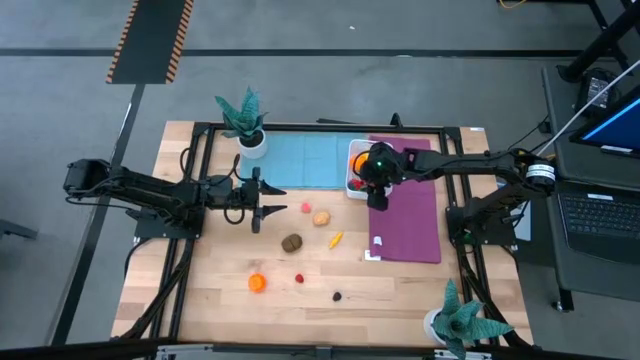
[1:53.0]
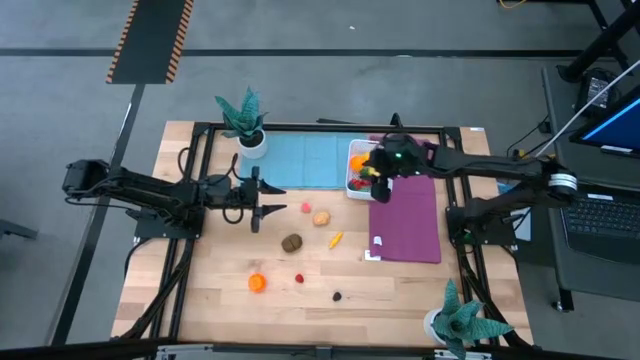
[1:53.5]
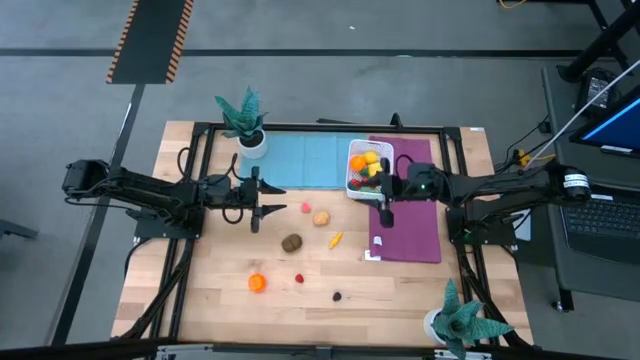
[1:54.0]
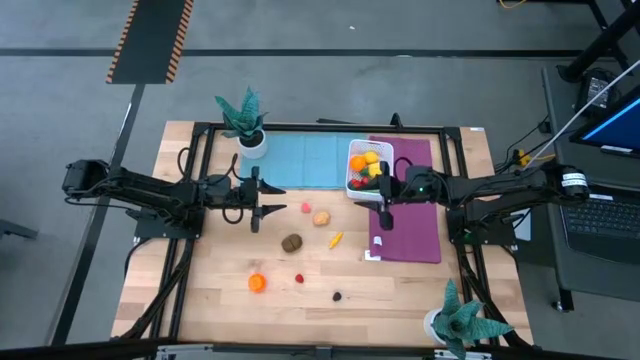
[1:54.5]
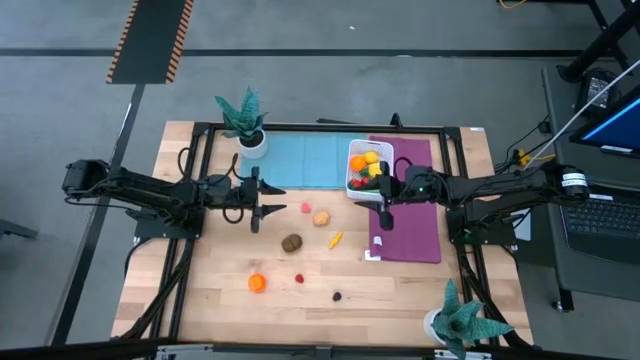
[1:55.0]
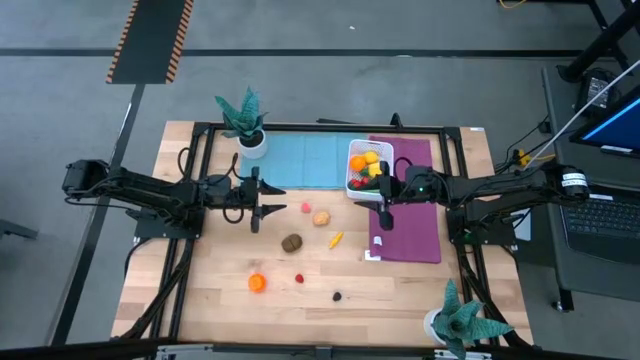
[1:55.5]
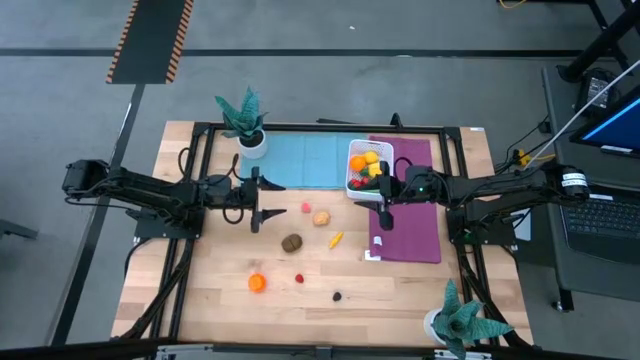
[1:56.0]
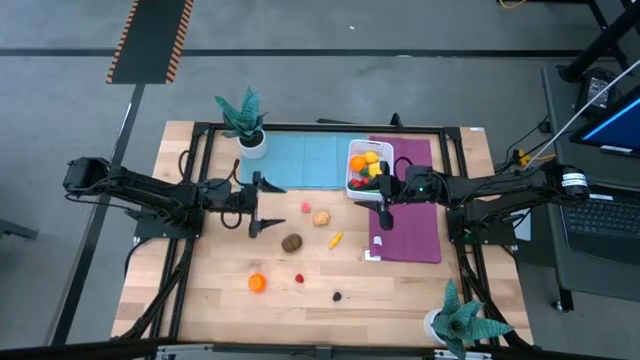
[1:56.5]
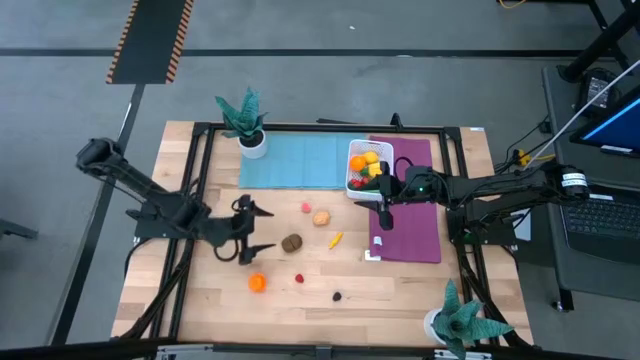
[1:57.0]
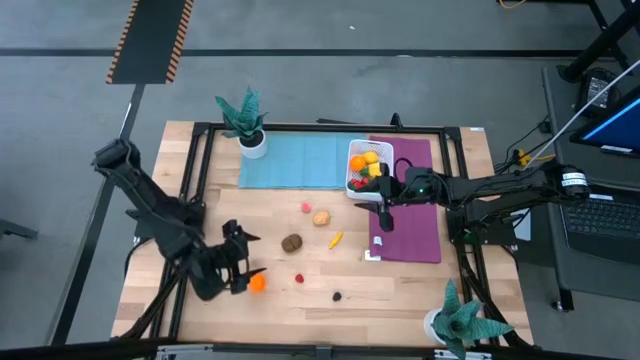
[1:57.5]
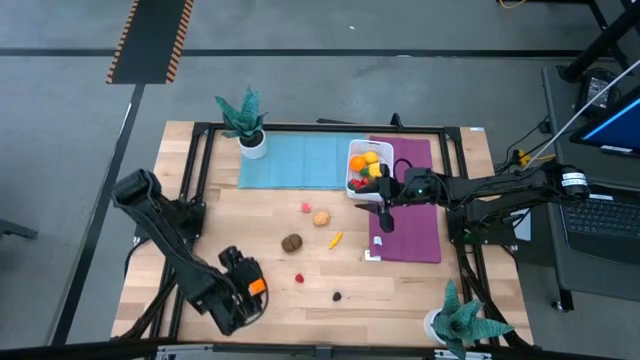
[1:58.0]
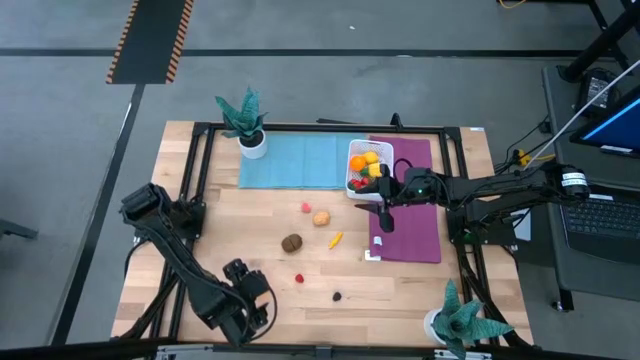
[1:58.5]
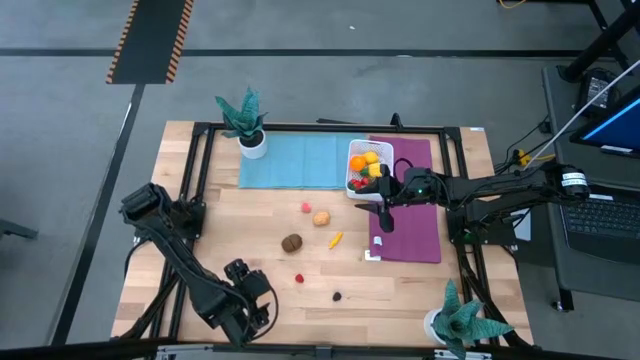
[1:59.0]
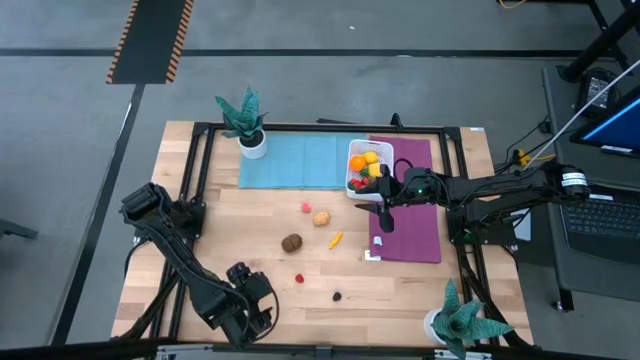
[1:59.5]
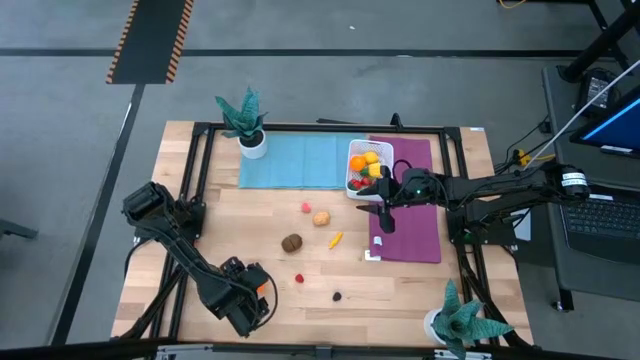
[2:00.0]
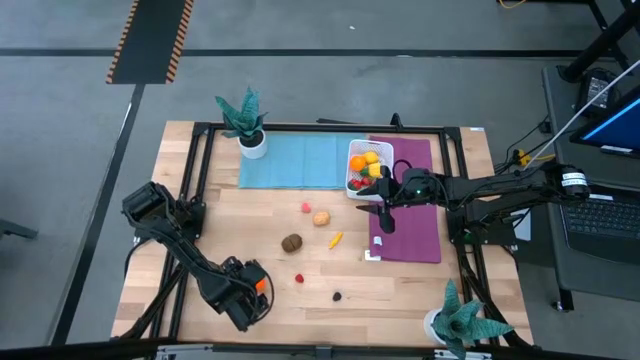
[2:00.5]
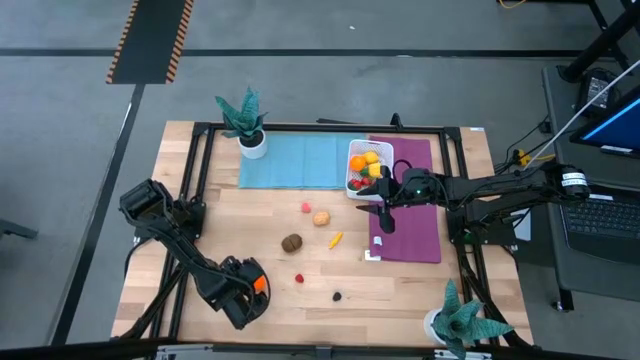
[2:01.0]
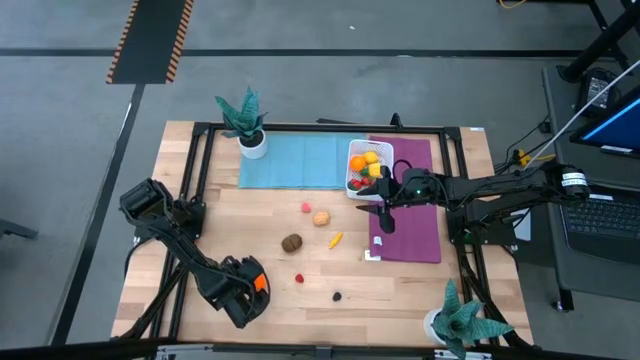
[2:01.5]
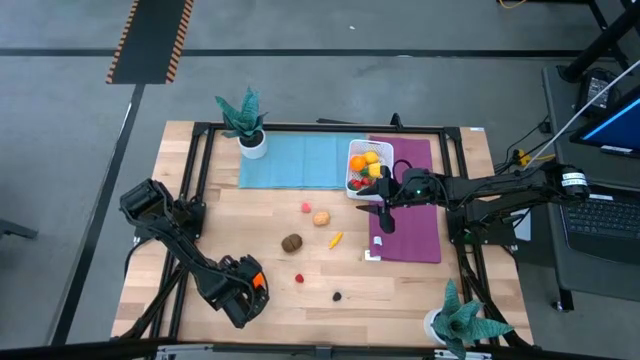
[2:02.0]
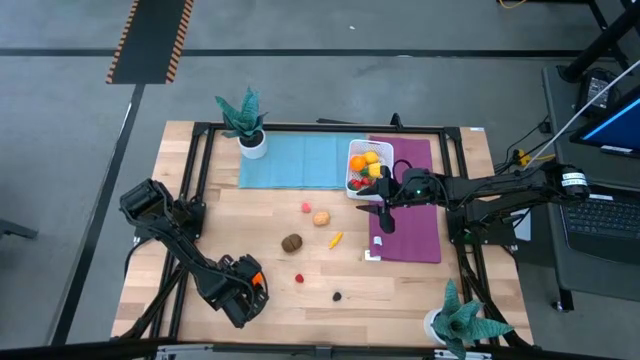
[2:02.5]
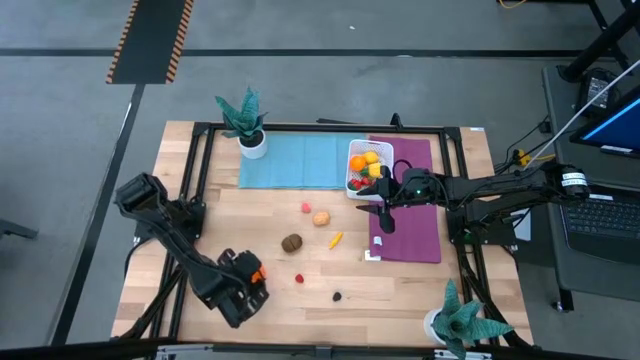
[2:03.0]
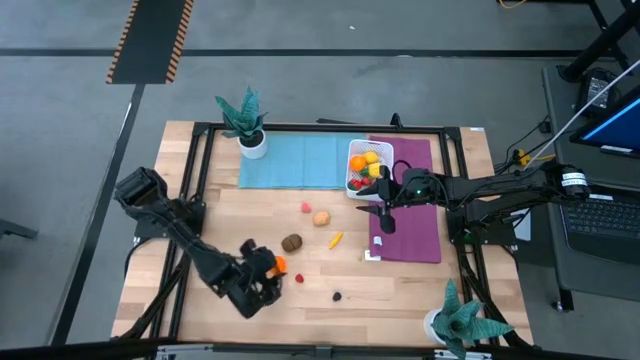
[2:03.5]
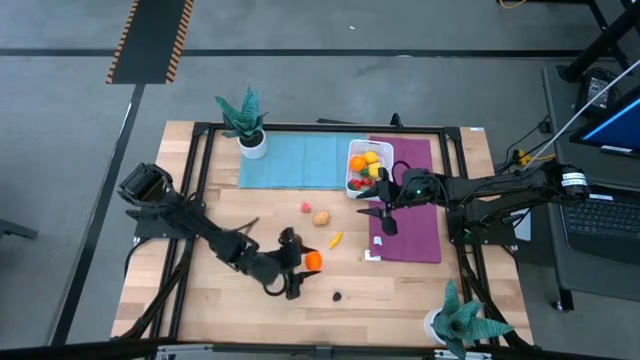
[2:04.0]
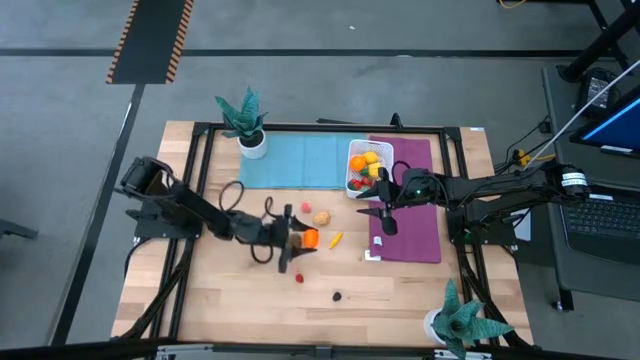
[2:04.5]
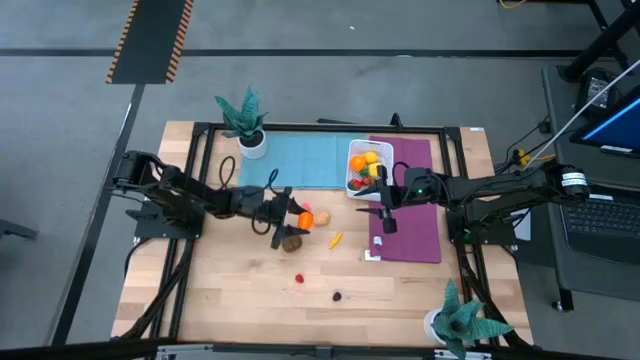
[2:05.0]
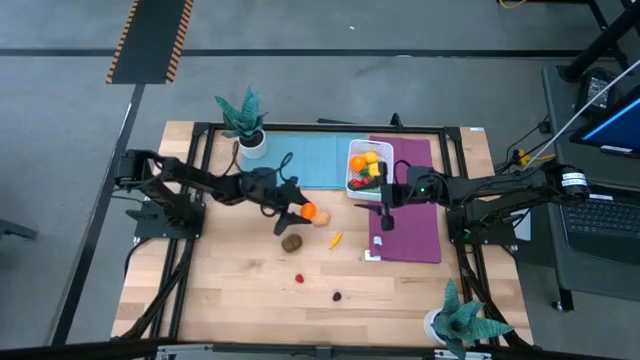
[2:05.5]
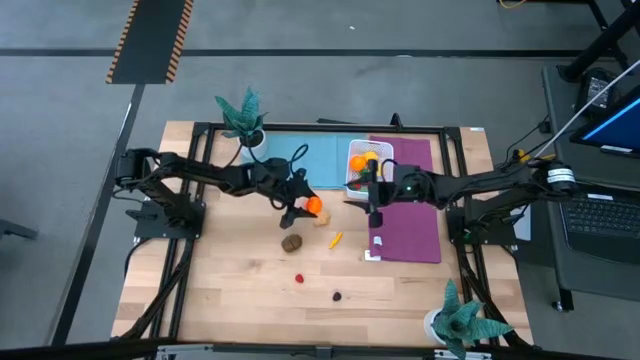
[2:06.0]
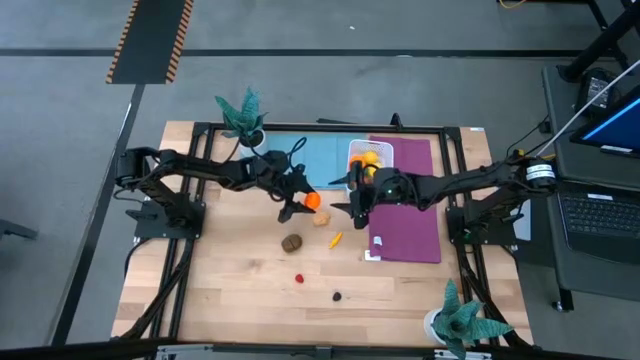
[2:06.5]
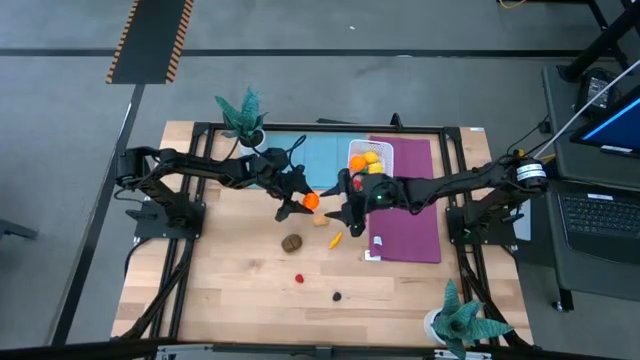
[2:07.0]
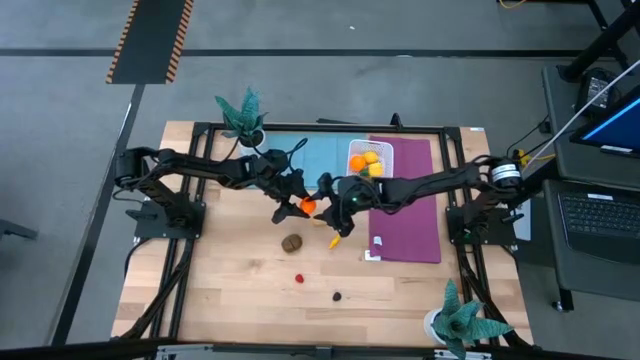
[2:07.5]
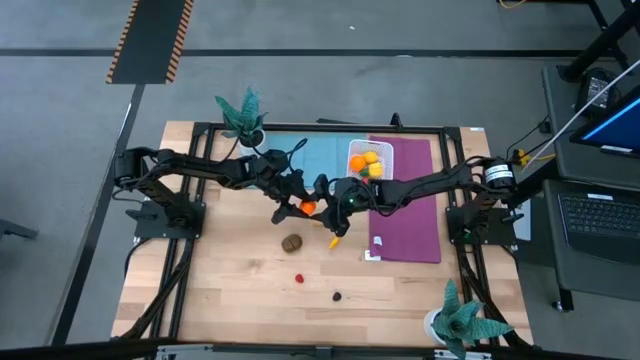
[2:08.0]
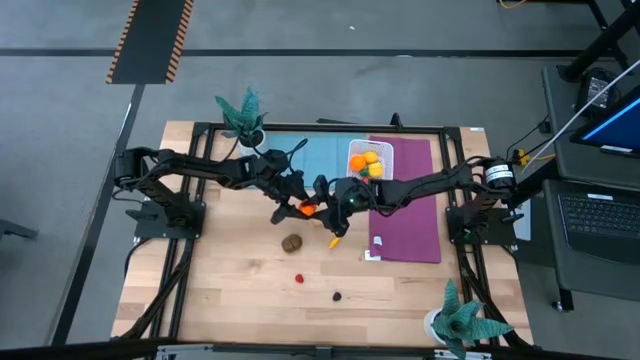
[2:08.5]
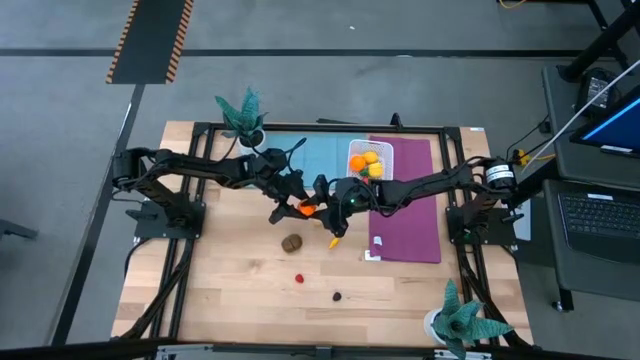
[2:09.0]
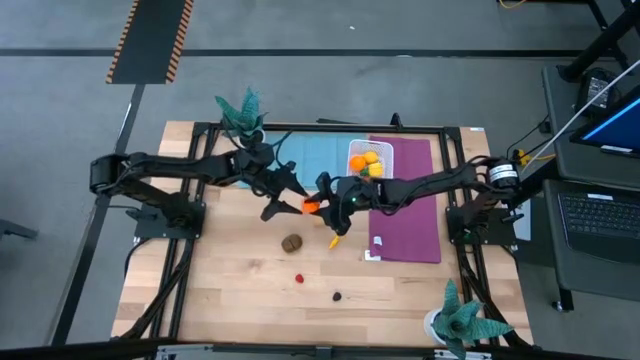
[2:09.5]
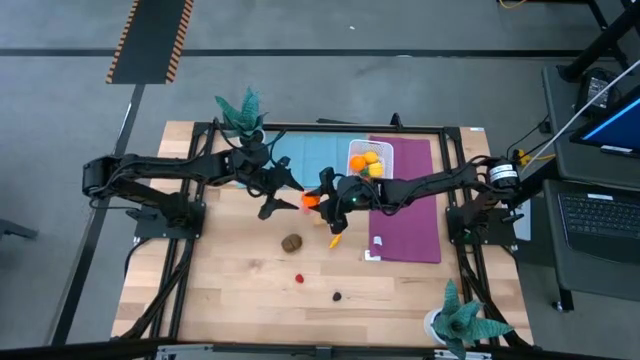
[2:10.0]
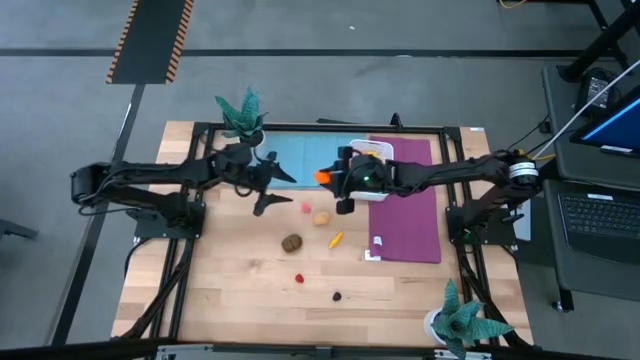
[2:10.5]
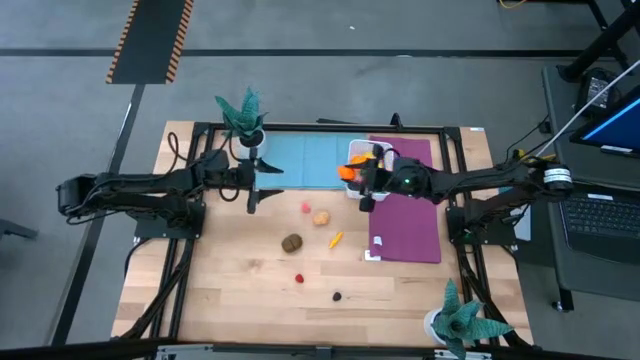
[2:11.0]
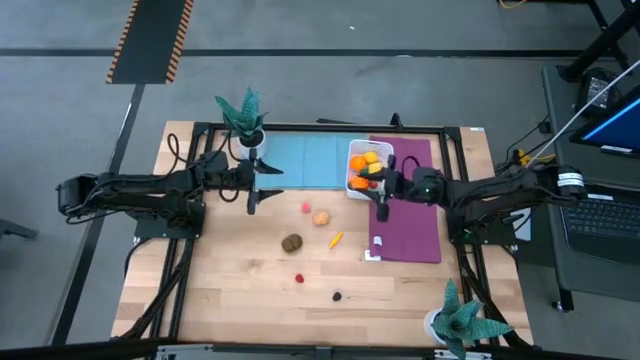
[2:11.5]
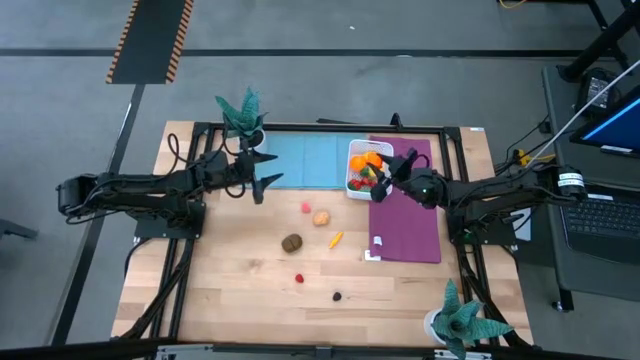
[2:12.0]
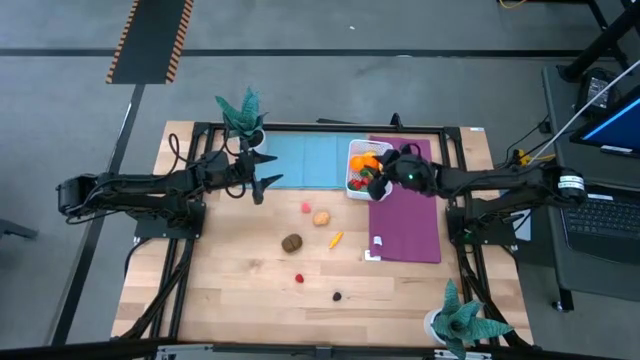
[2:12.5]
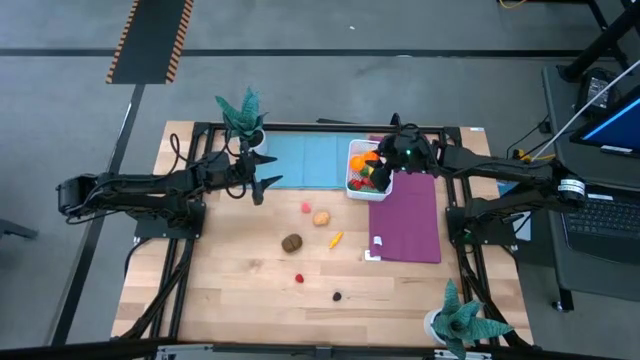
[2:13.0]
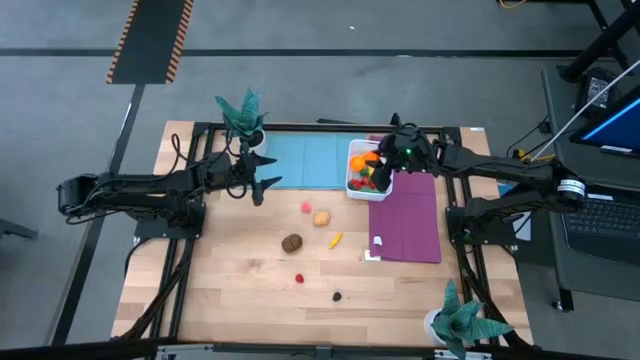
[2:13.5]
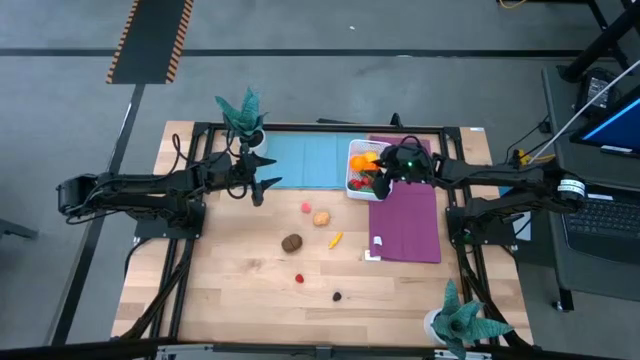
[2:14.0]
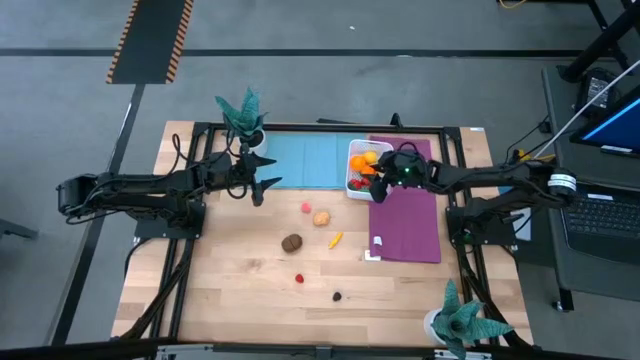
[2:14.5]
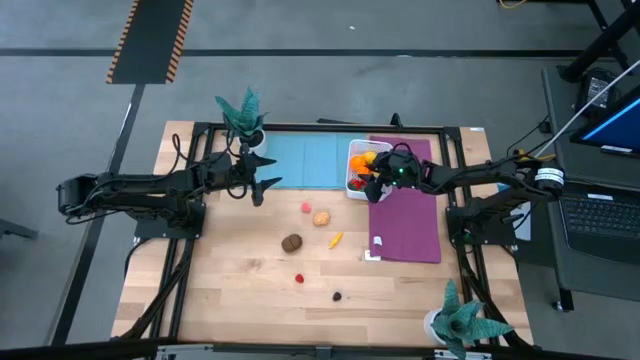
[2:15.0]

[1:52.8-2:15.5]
Task: Pick and placing Produce into tupperware
Put the orange pumpkin into the white container
